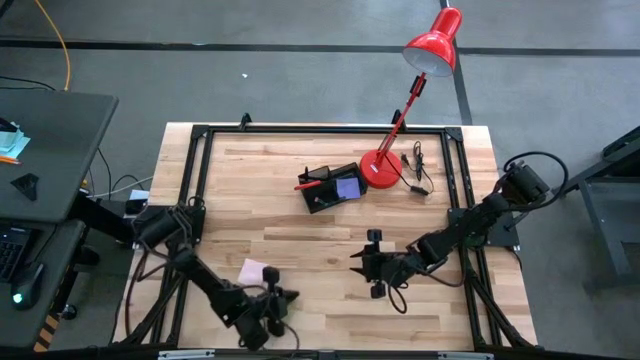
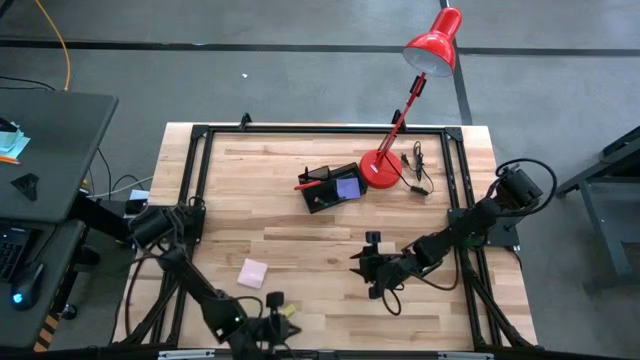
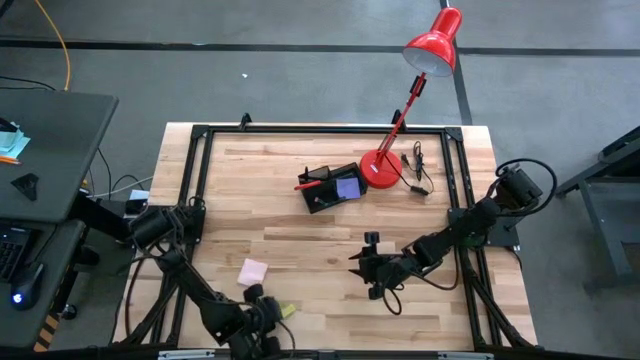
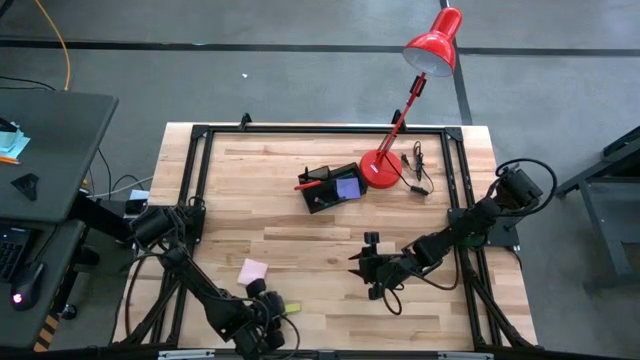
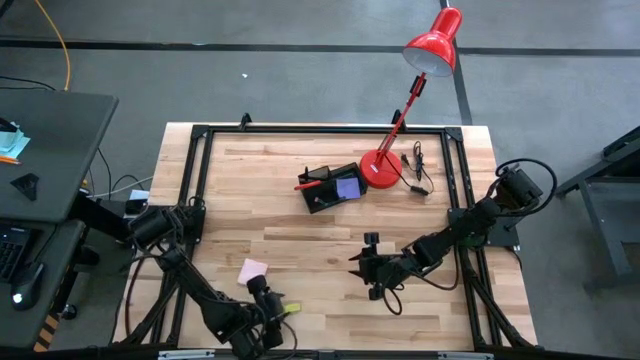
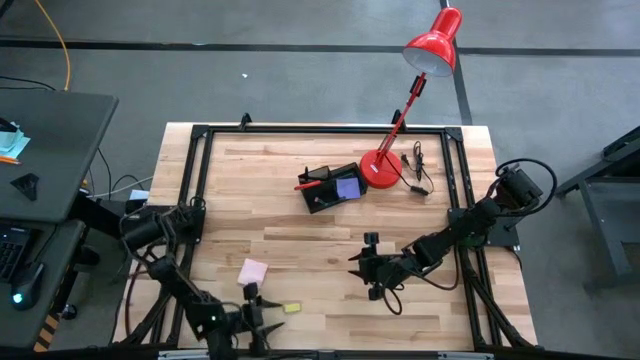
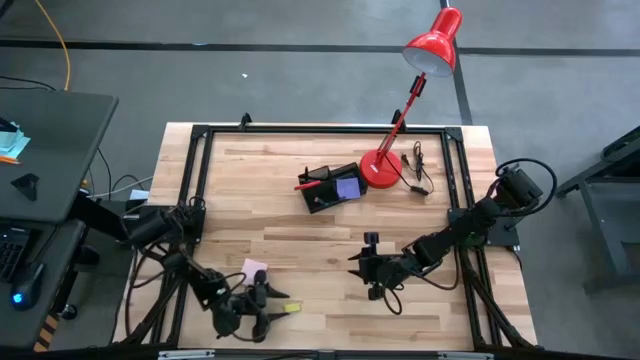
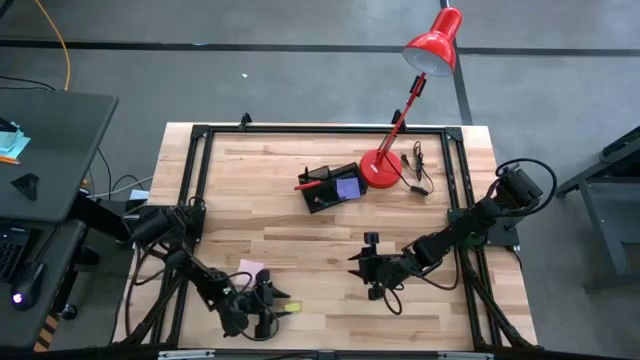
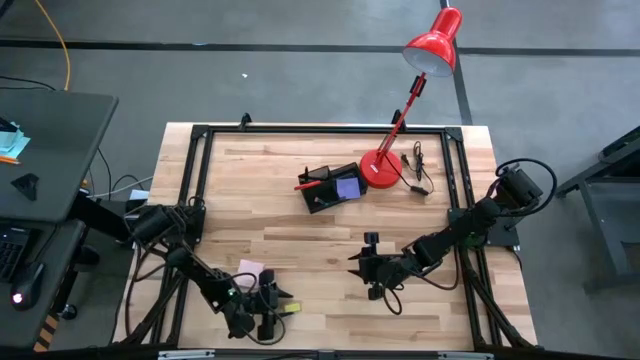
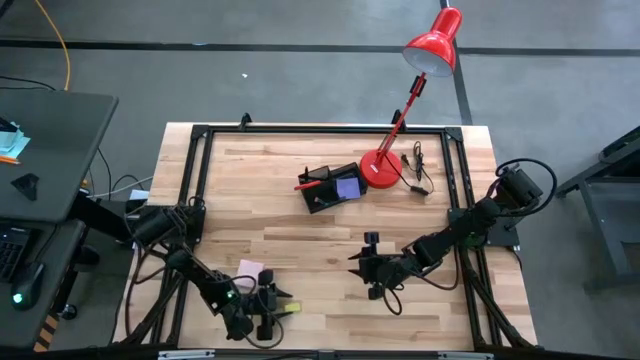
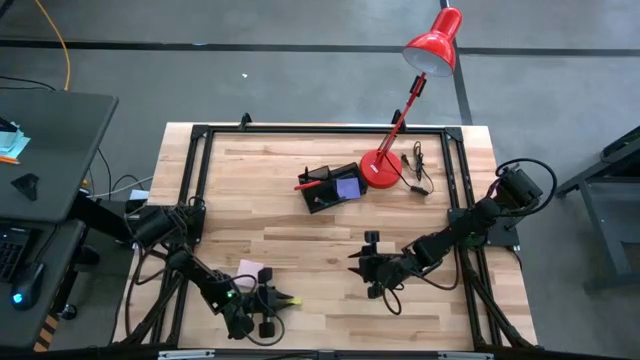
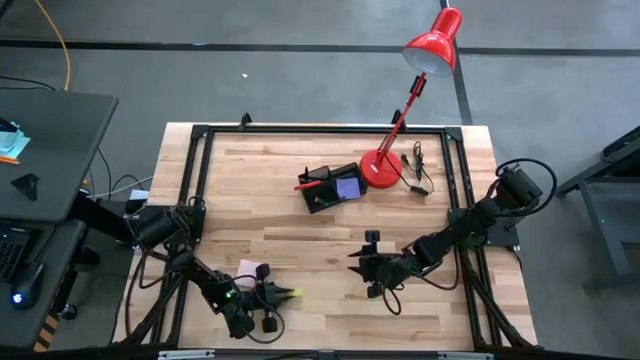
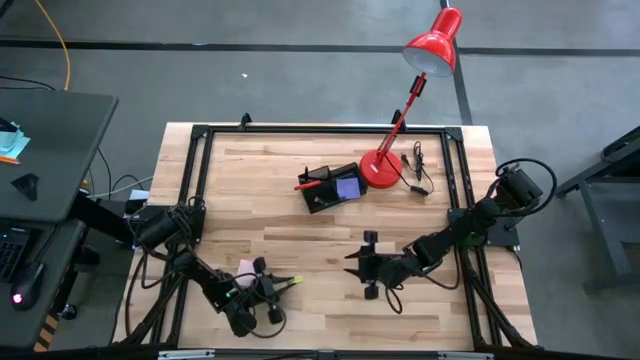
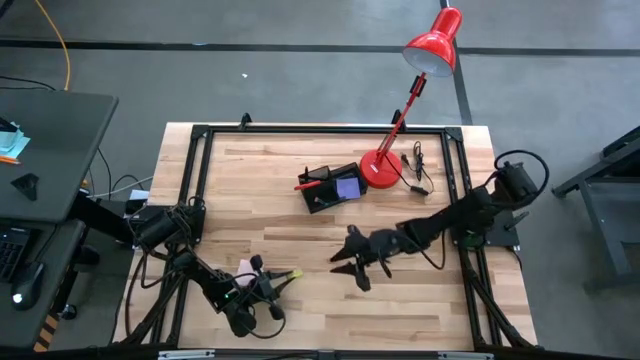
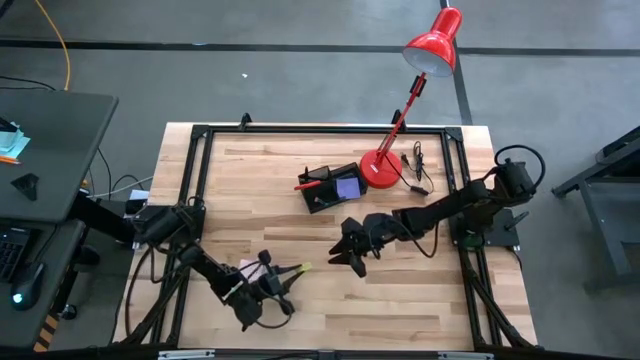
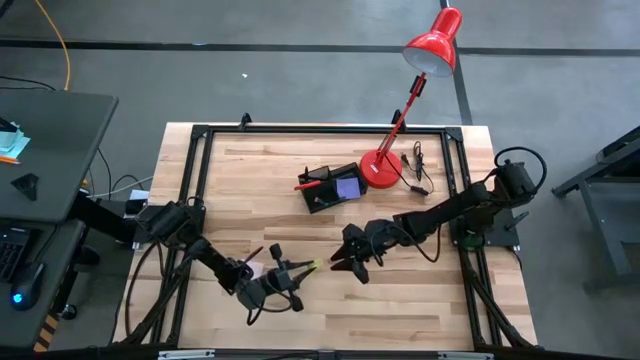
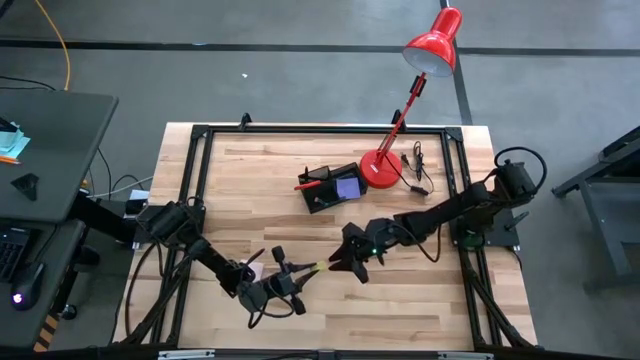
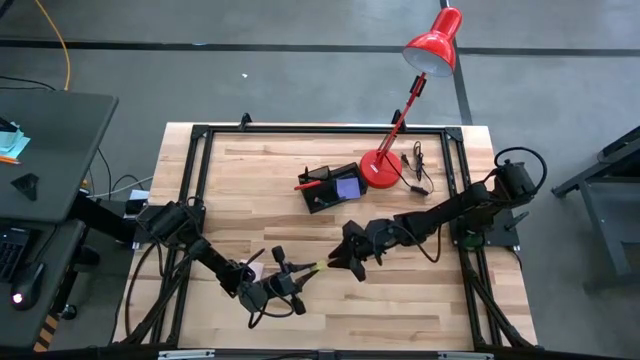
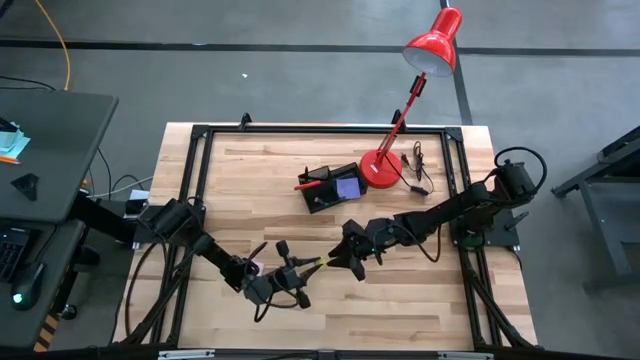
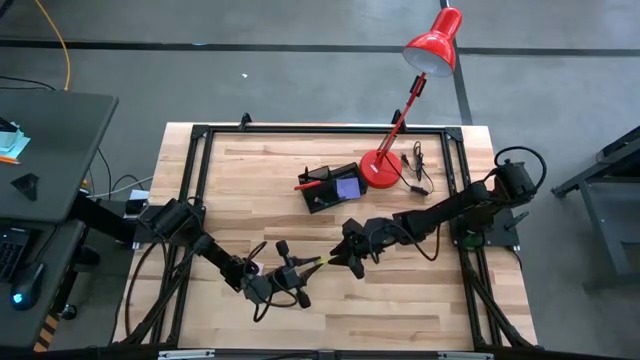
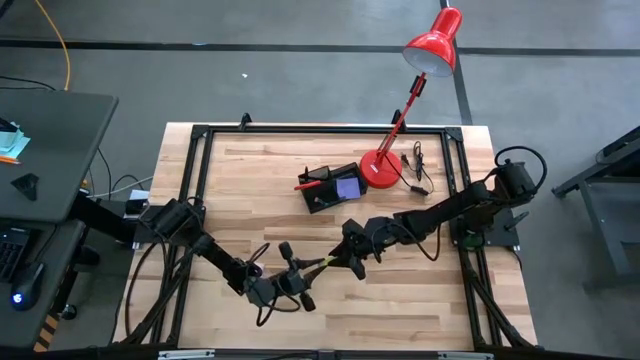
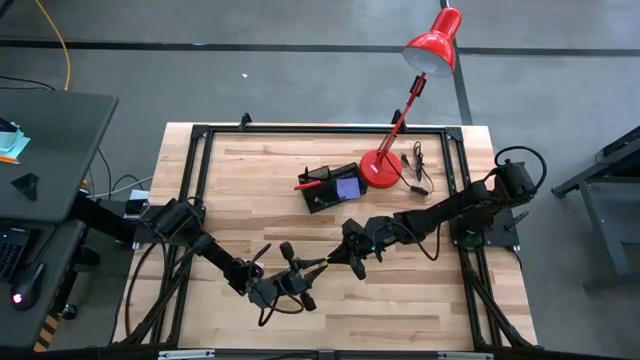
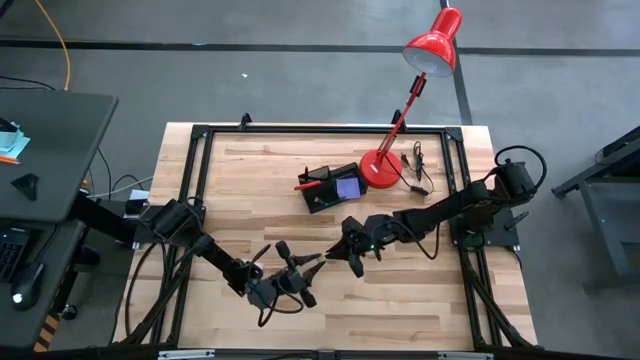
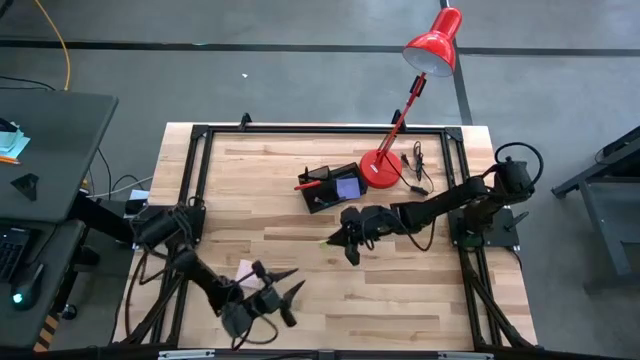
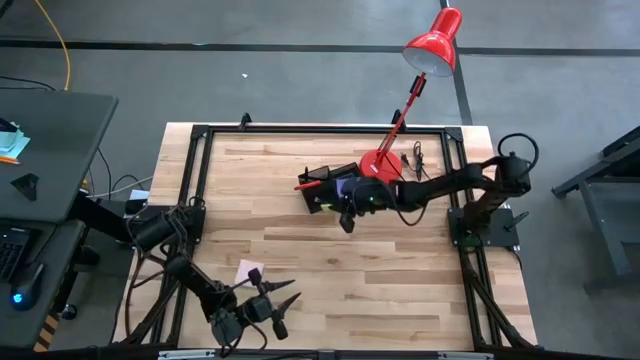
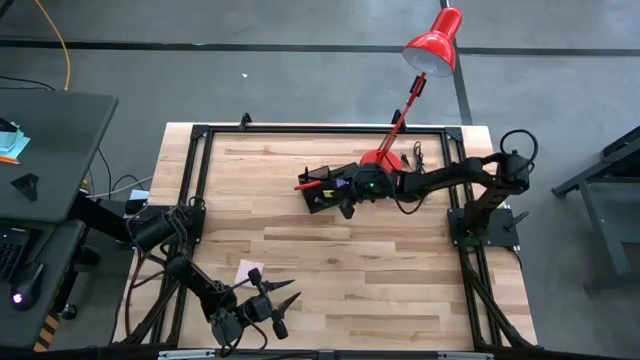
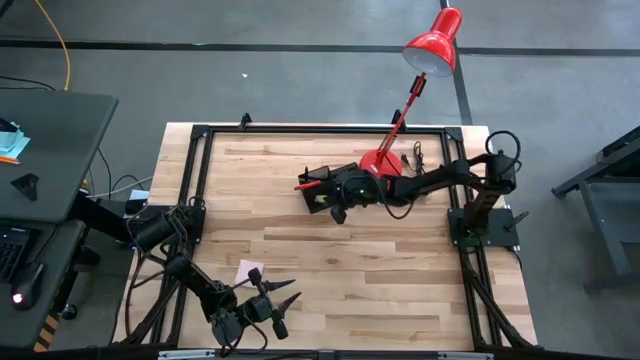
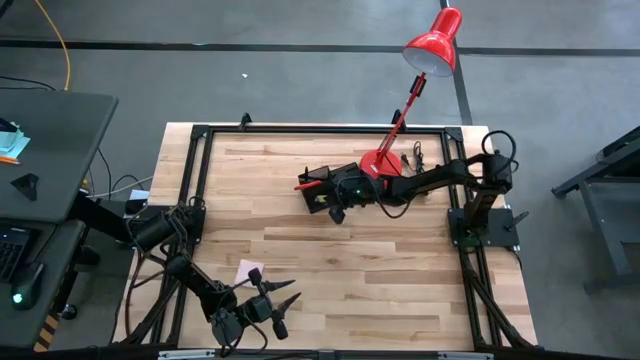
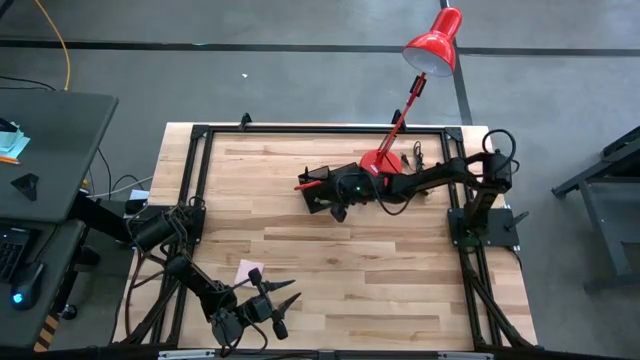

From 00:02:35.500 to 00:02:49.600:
Task: Pick and place office supplies into organizer
Put the yellow eraser into the black desk organizer

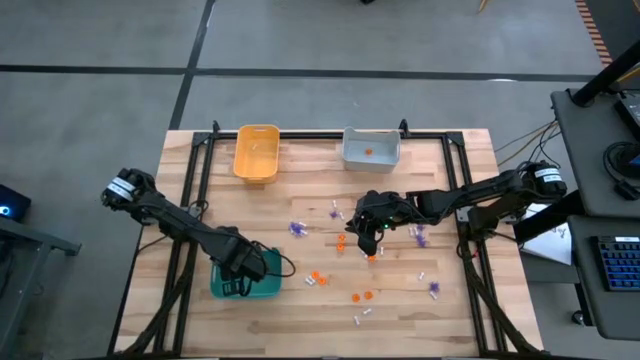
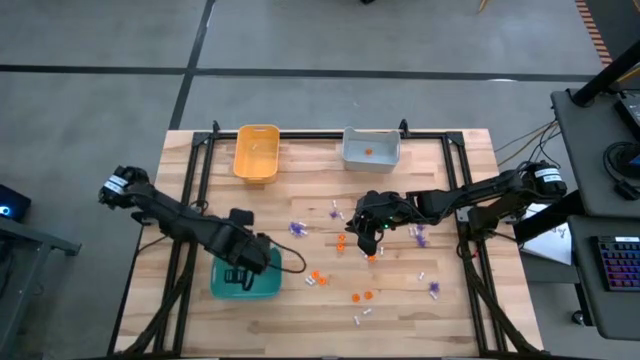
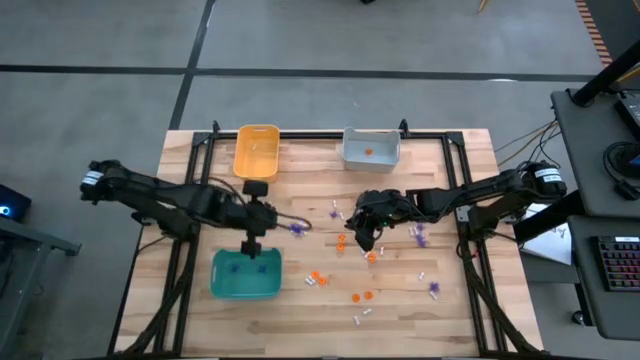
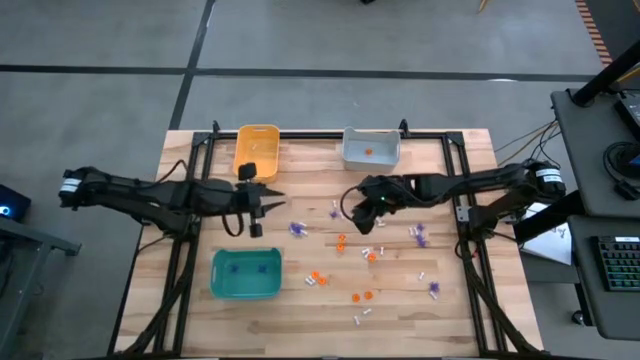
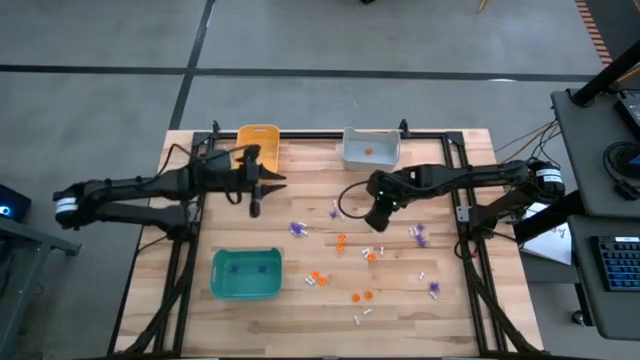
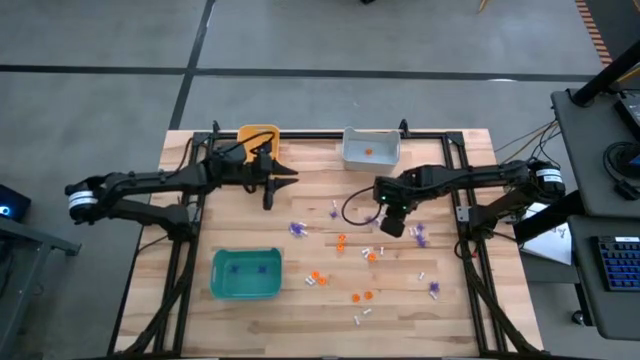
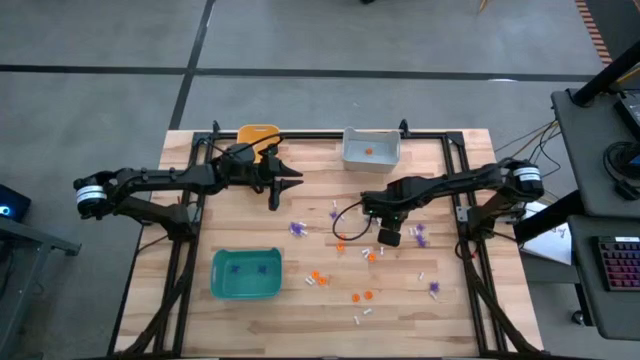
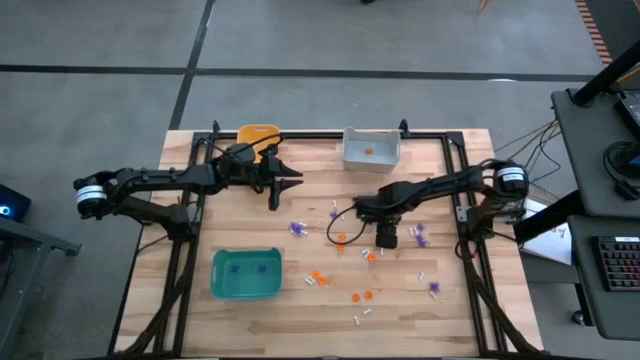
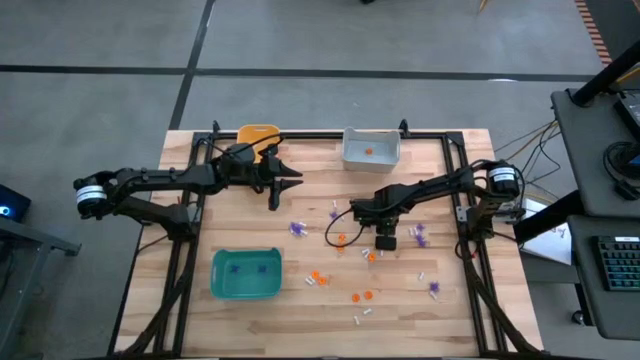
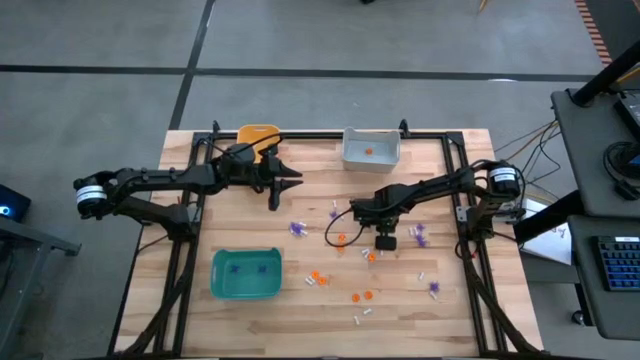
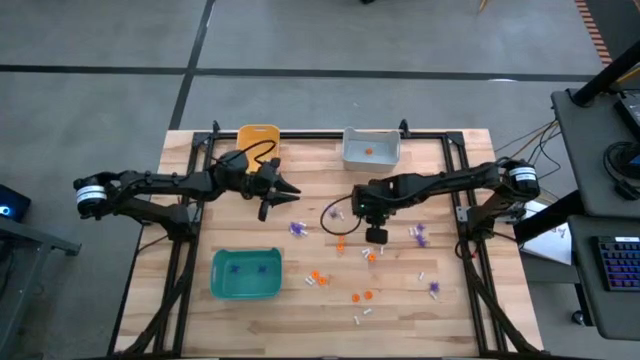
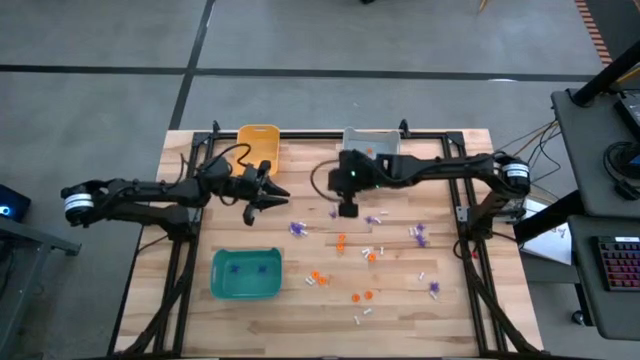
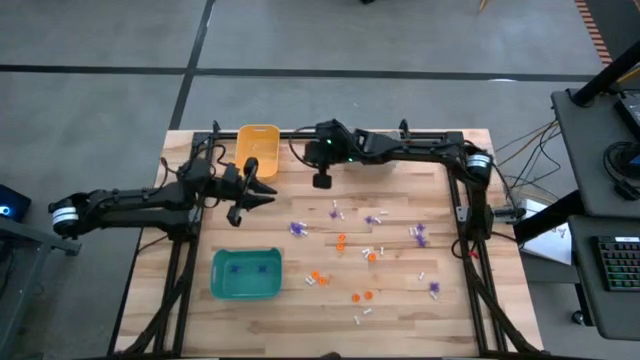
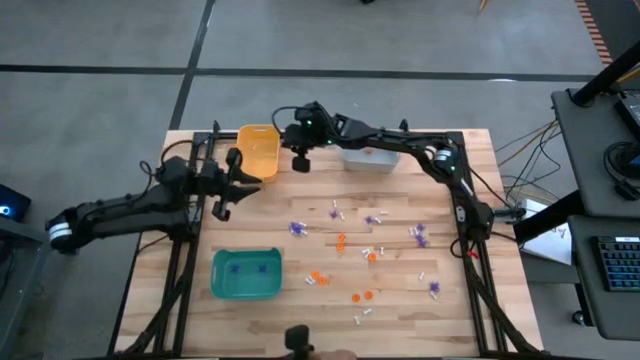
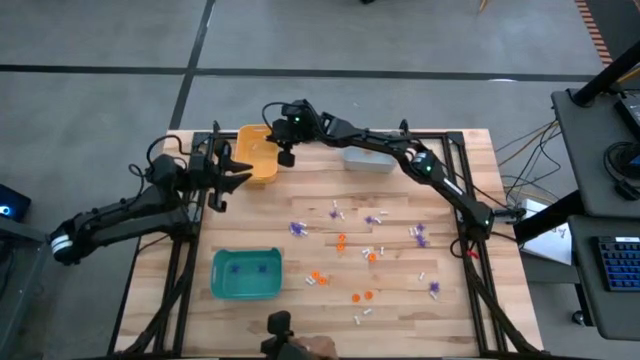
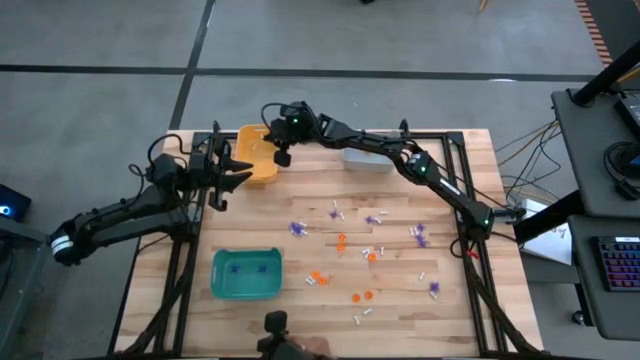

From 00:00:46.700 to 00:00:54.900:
Task: Sort Halloween decoration
Put the white bone toy into the orange bin
